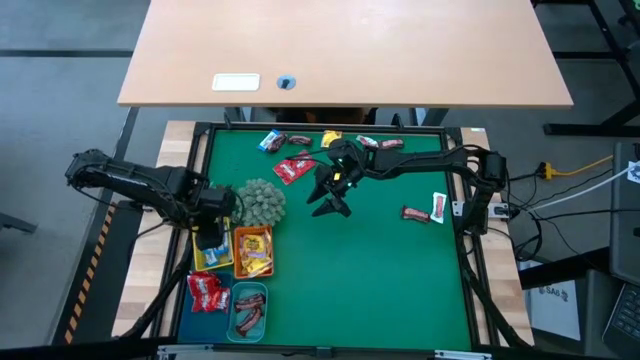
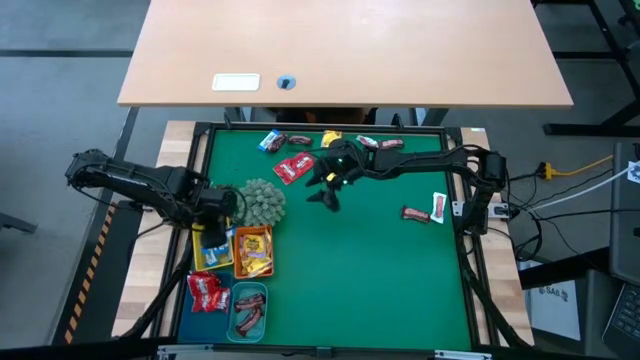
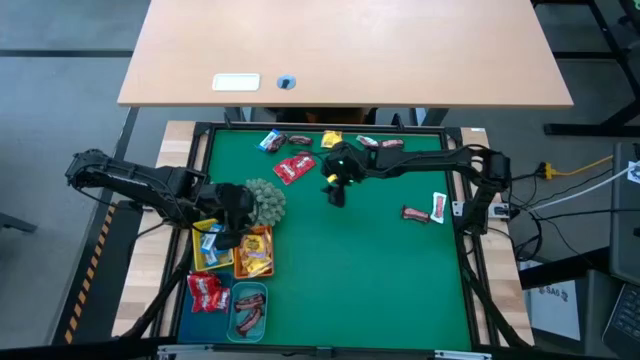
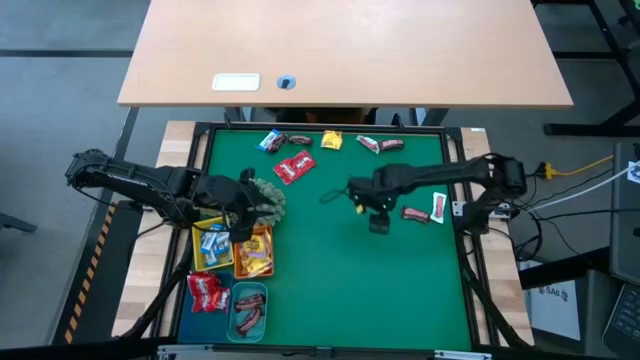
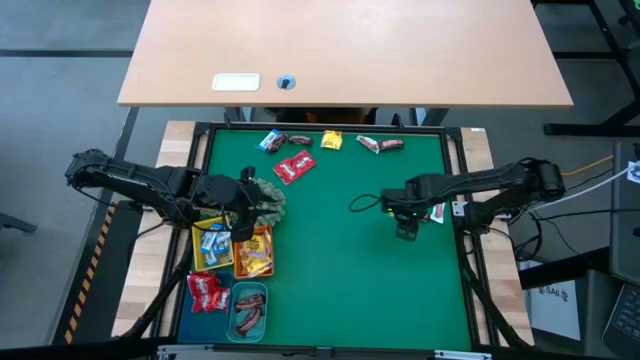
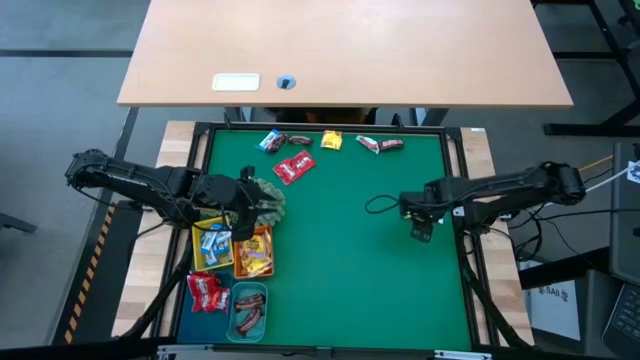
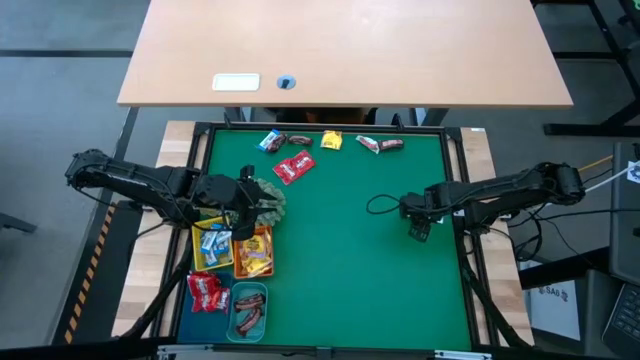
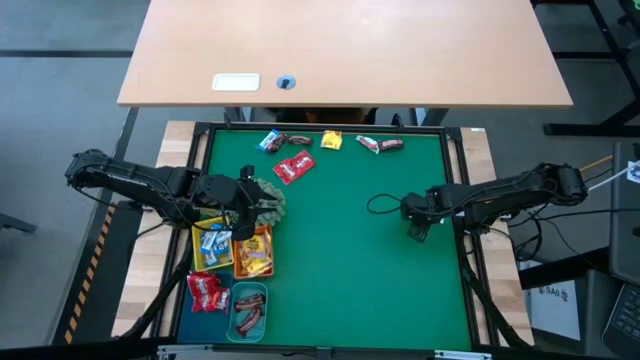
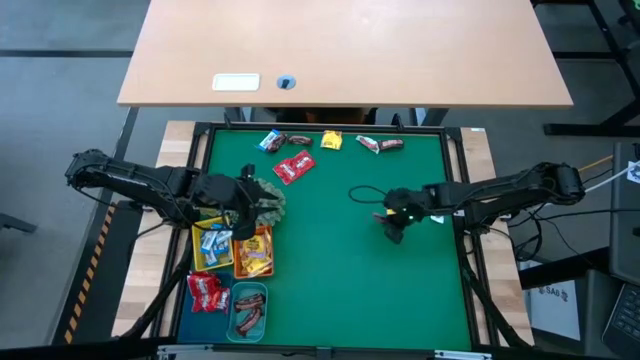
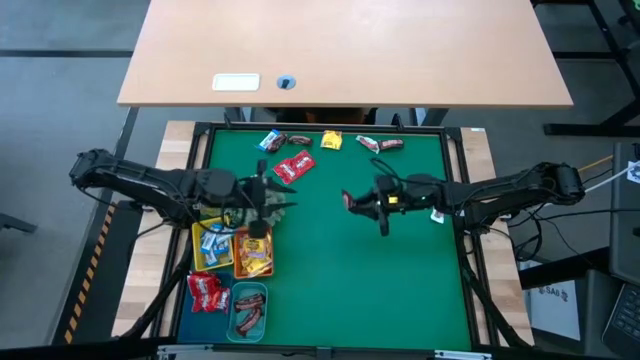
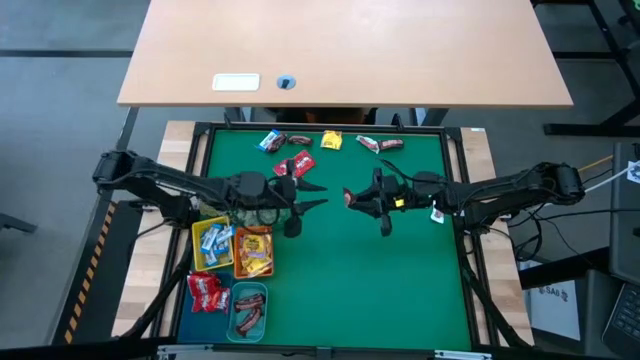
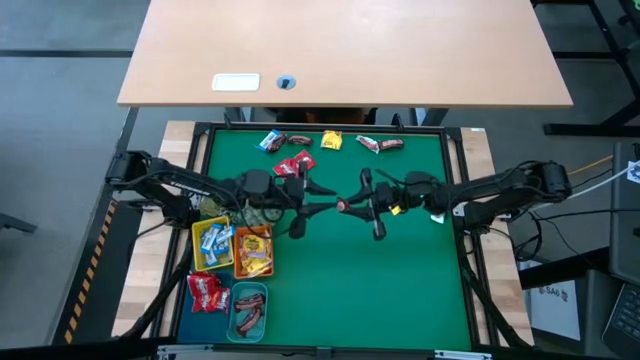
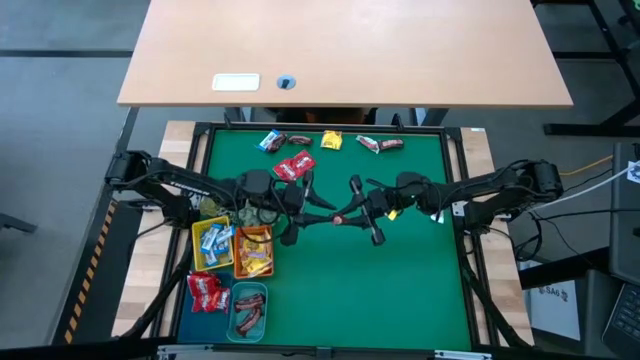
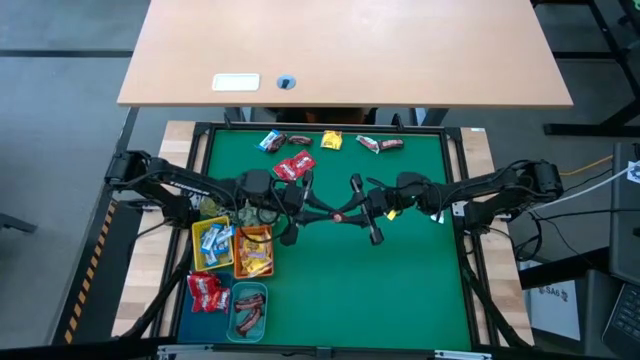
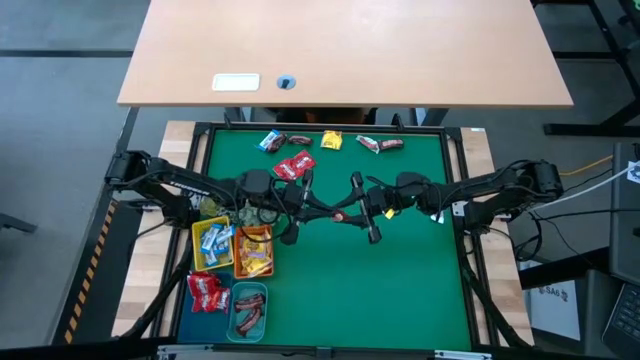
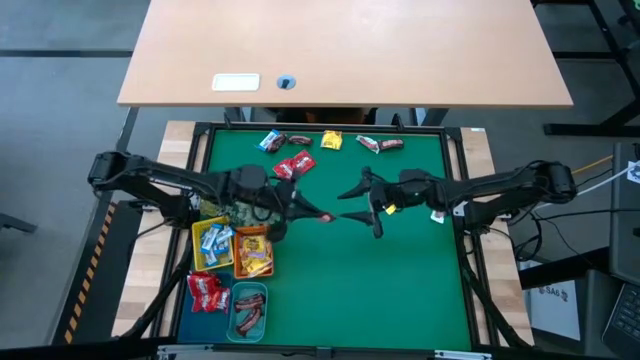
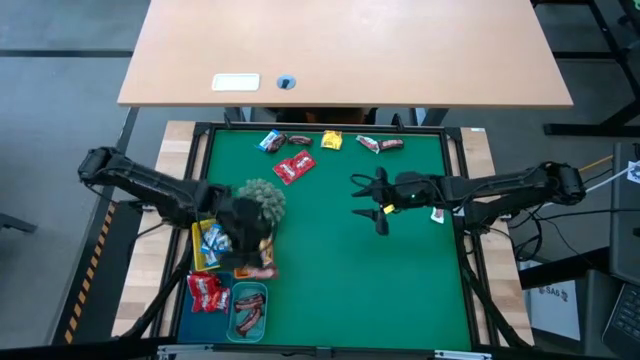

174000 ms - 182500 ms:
Task: Sort candy
Put the brown chocolate into the green basket

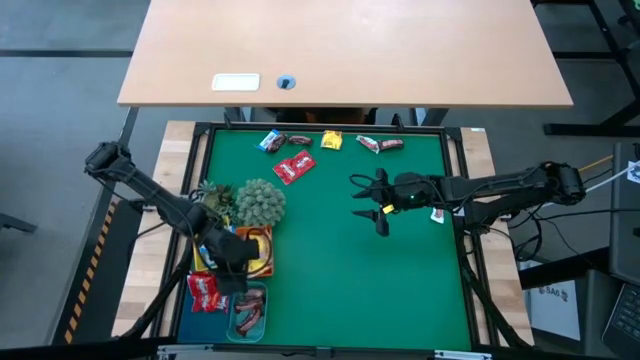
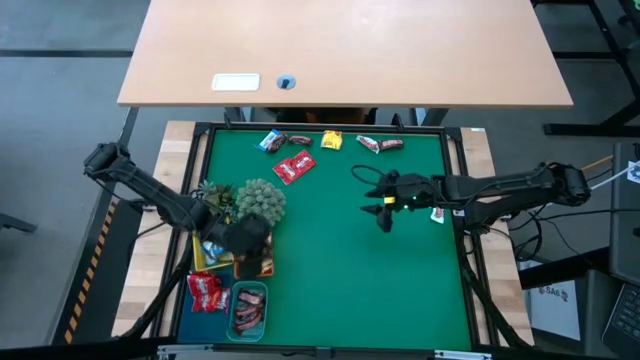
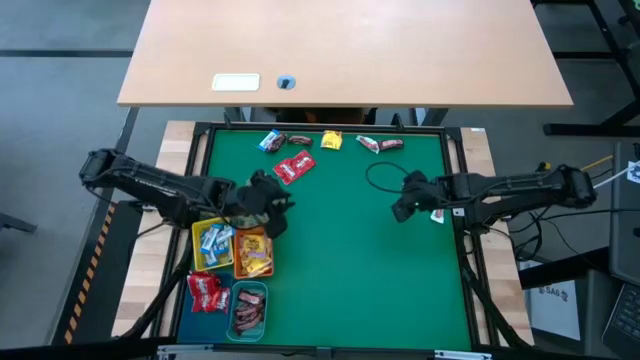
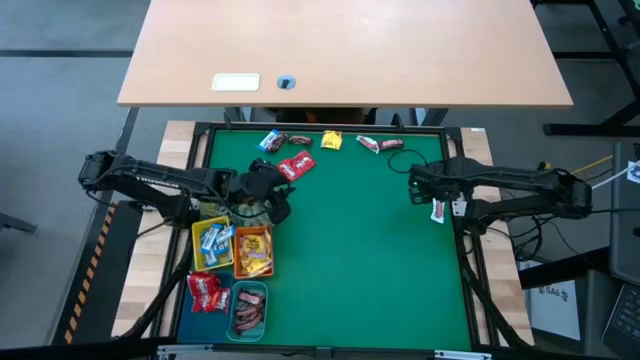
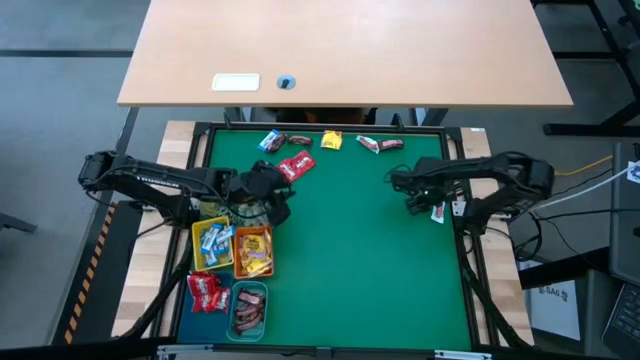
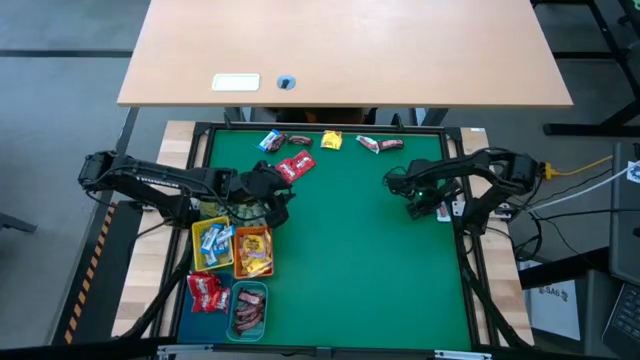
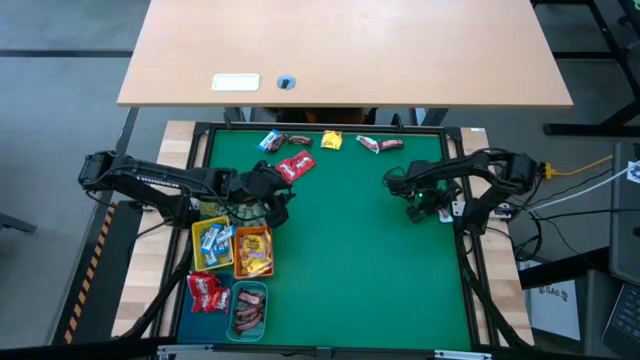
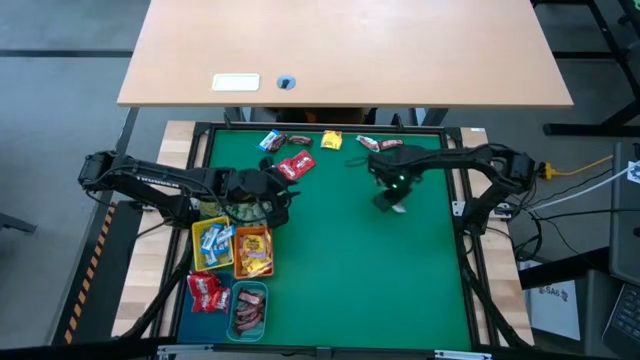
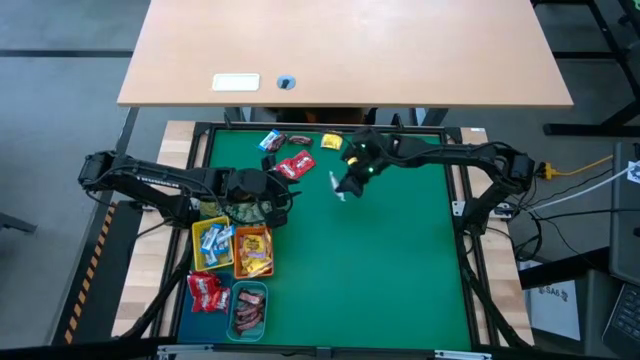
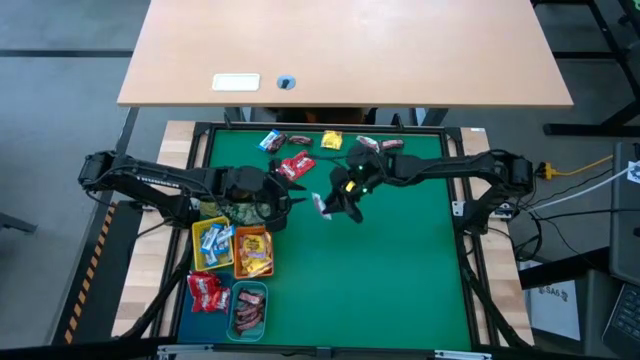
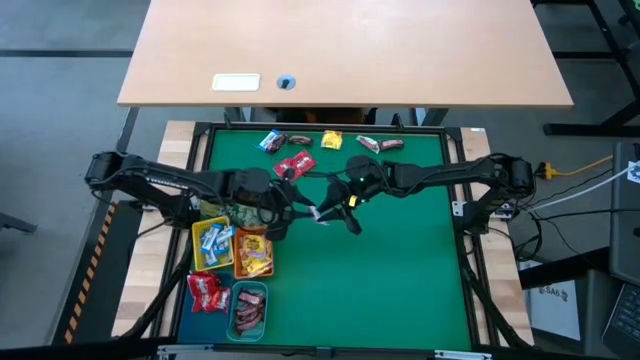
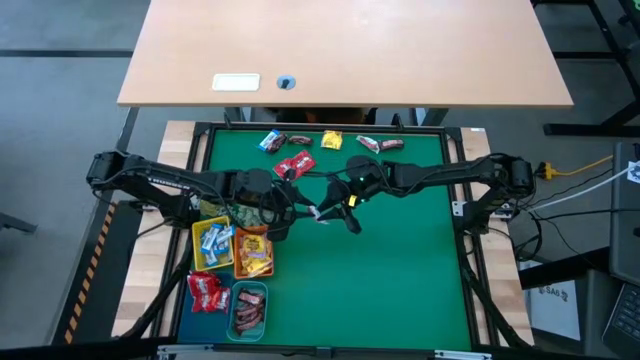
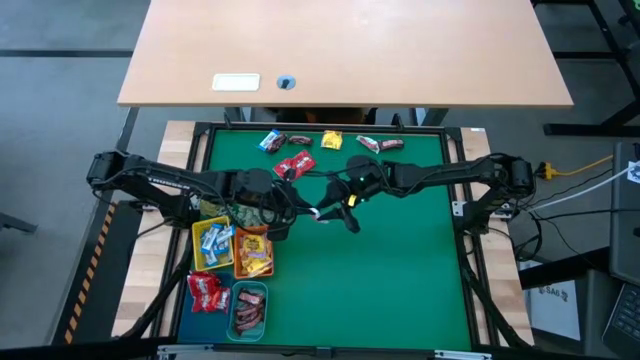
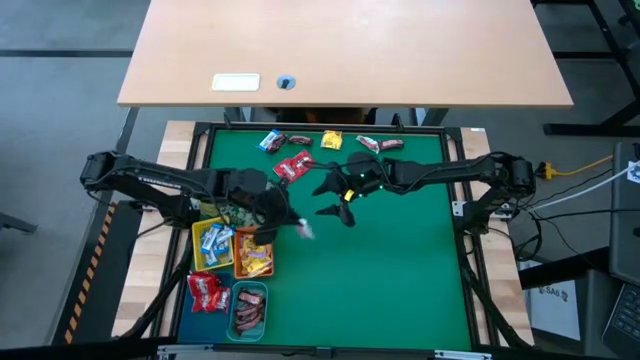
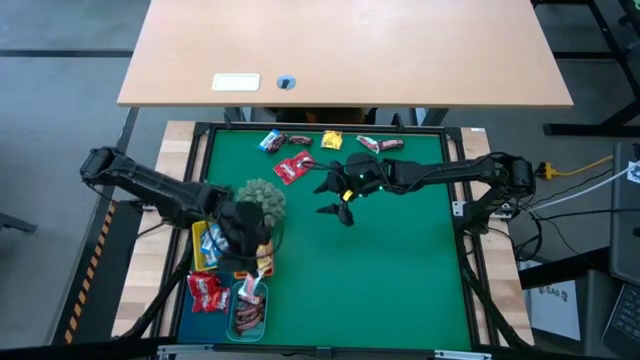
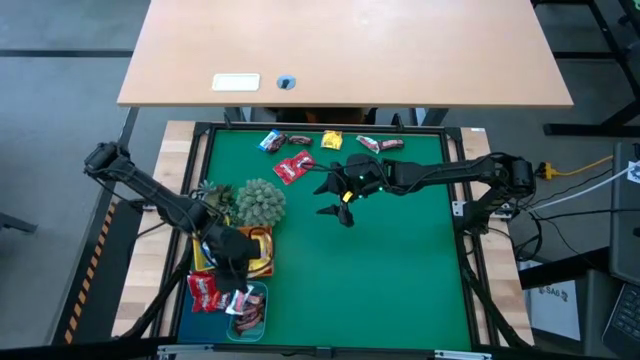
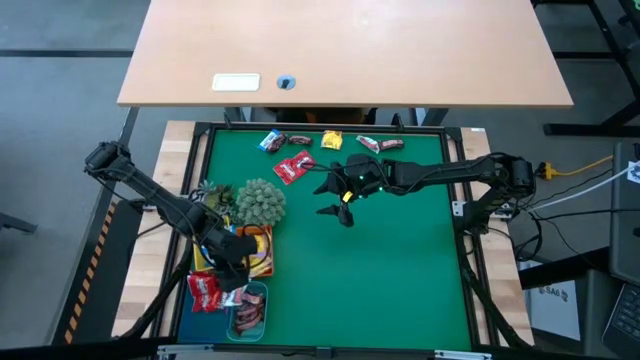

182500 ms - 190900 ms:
Put the white chocolate into the green basket

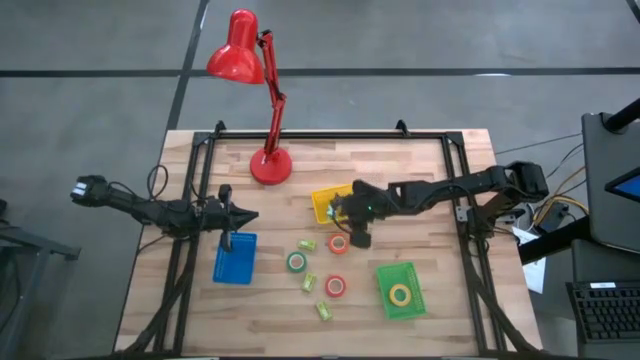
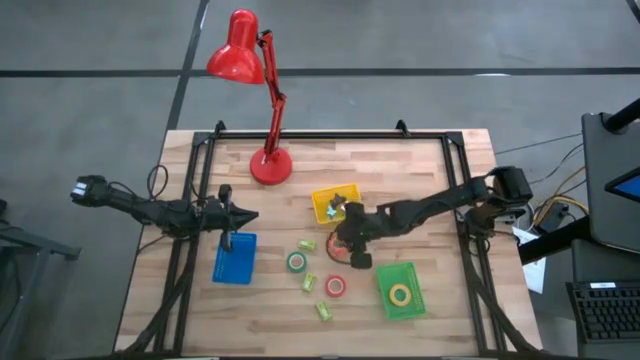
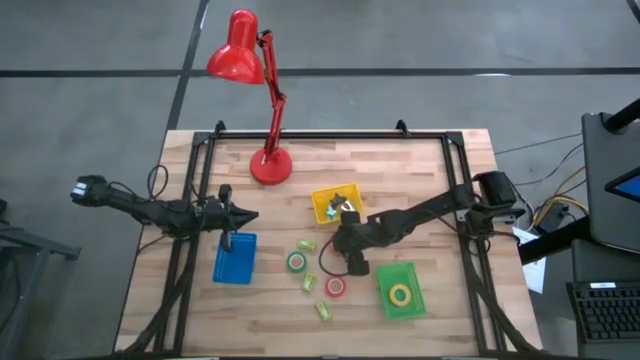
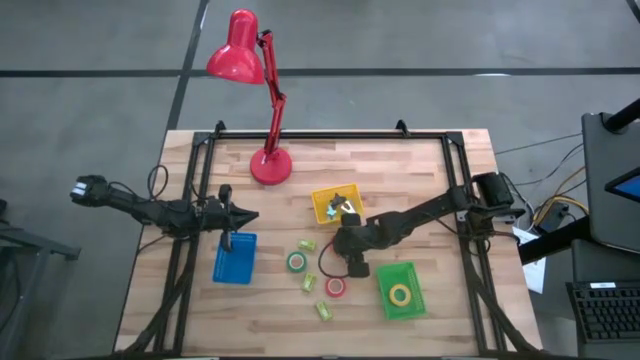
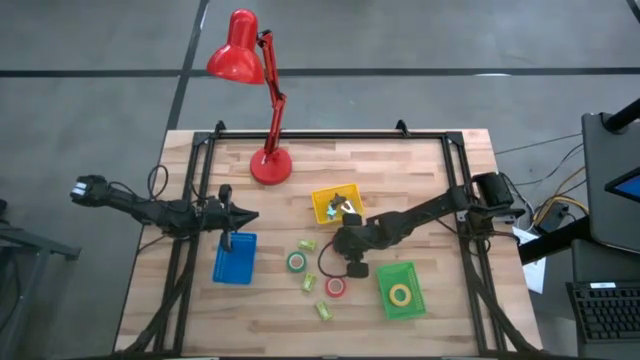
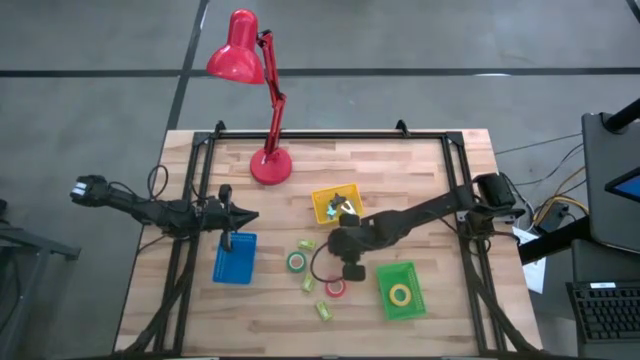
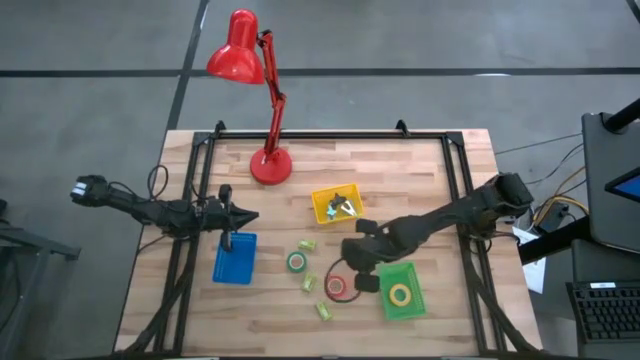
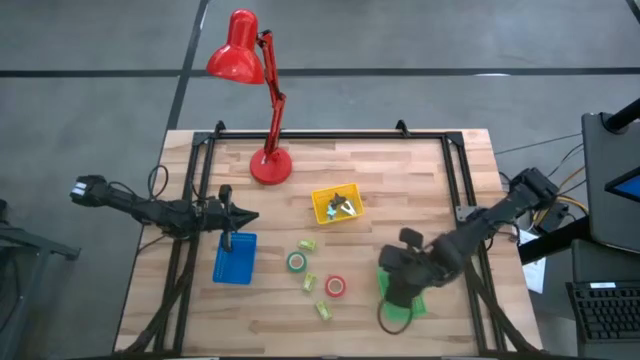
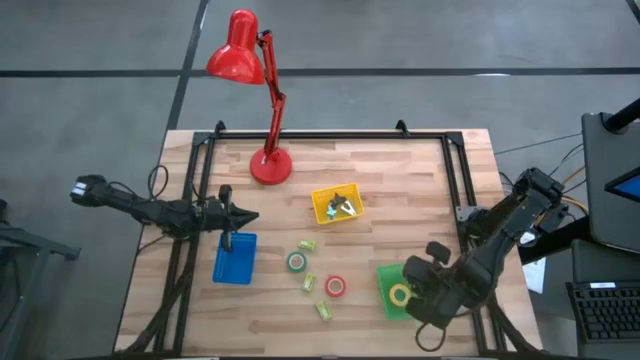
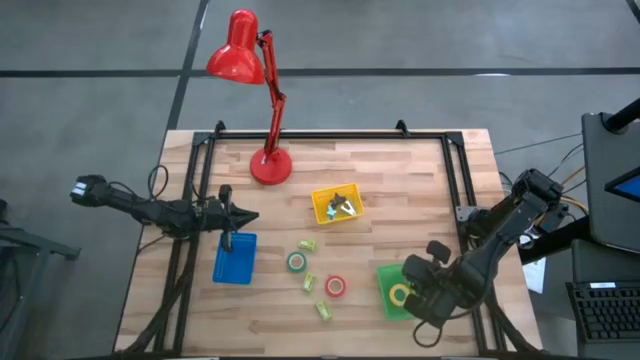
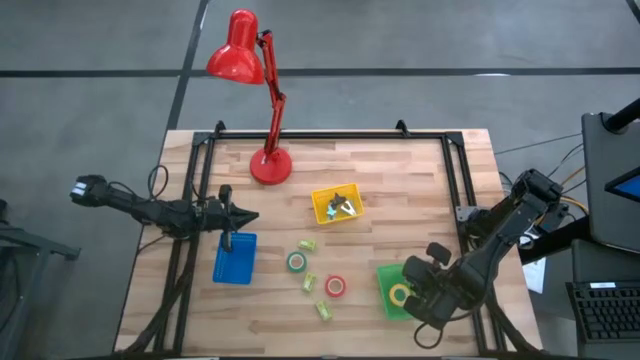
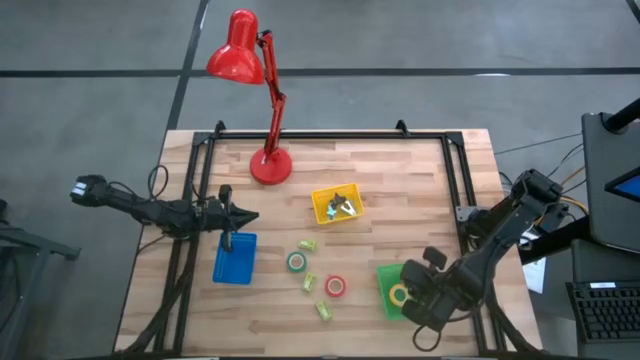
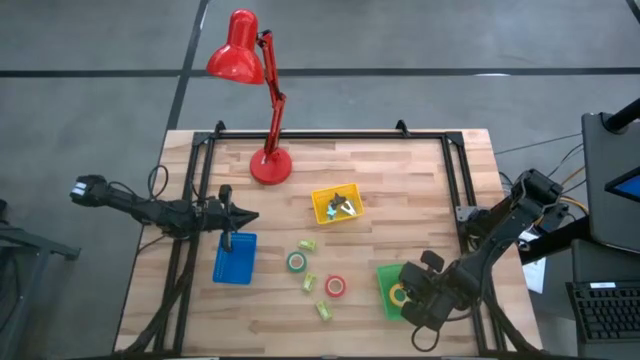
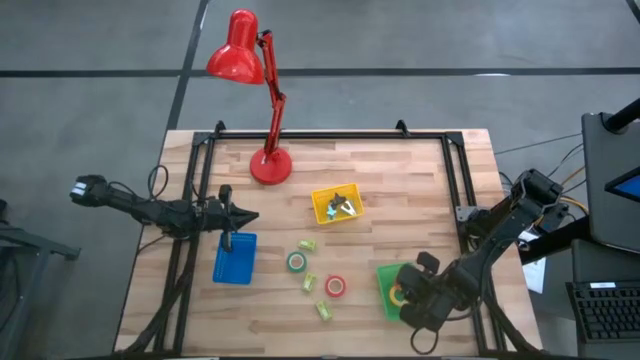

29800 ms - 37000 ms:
Task: Pick and place Stapler, Stapler remover, tape
Put the orange tape into the green bin
